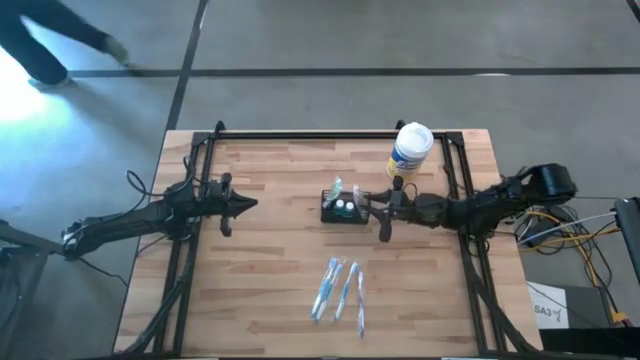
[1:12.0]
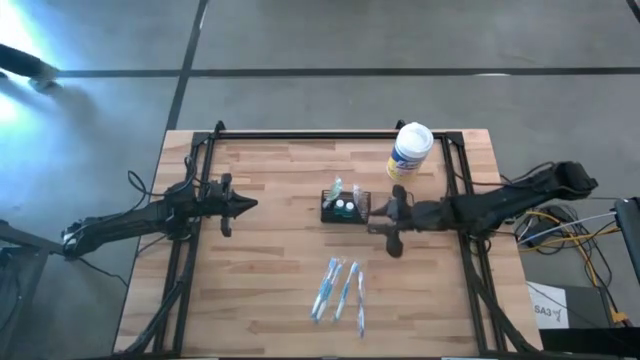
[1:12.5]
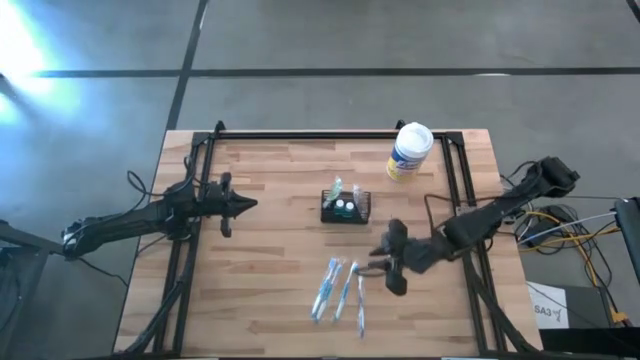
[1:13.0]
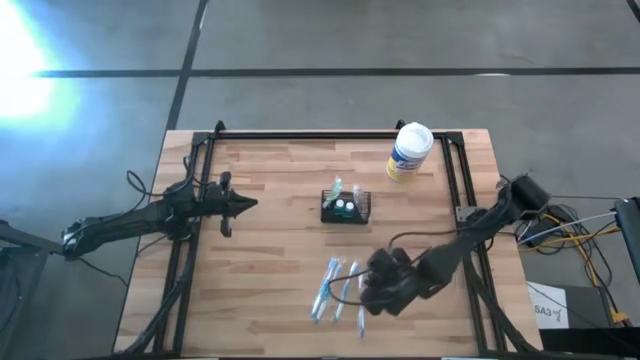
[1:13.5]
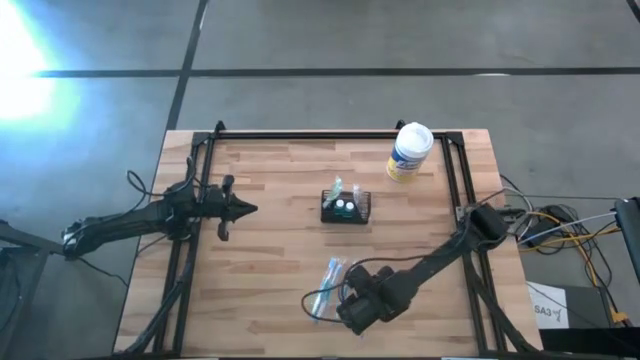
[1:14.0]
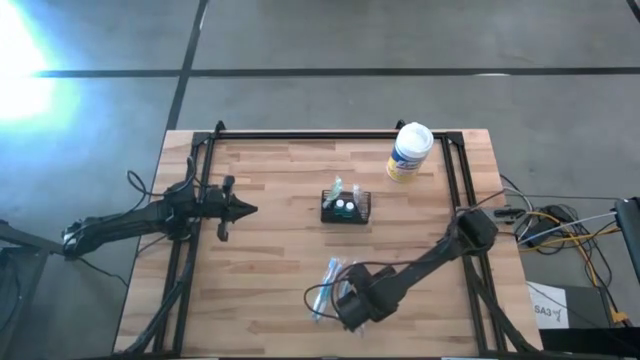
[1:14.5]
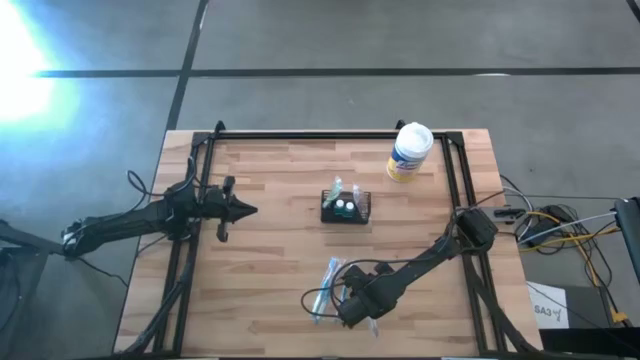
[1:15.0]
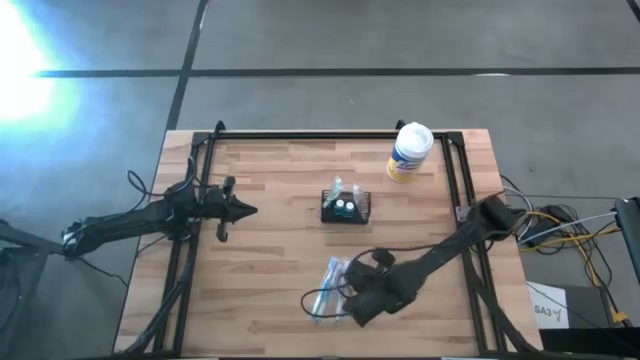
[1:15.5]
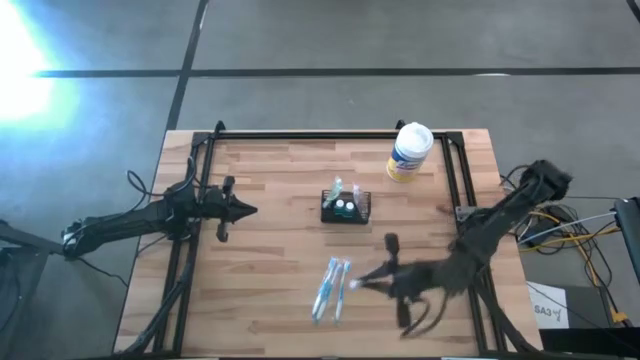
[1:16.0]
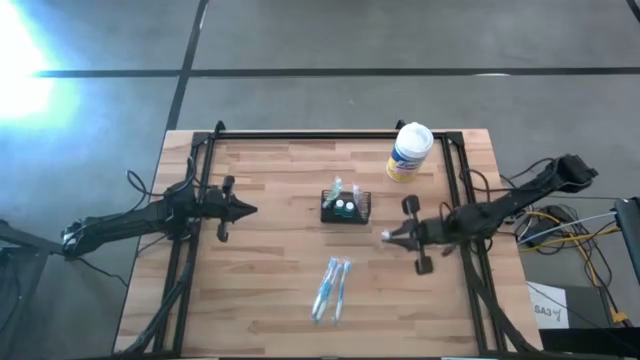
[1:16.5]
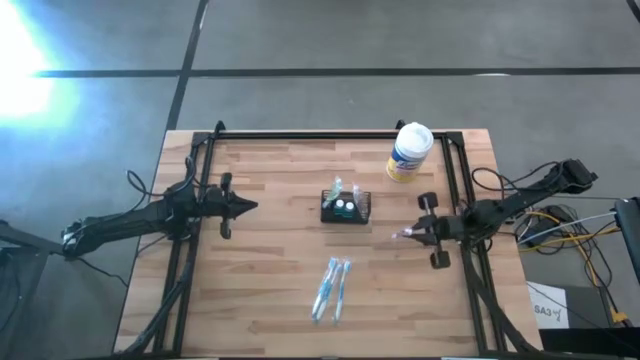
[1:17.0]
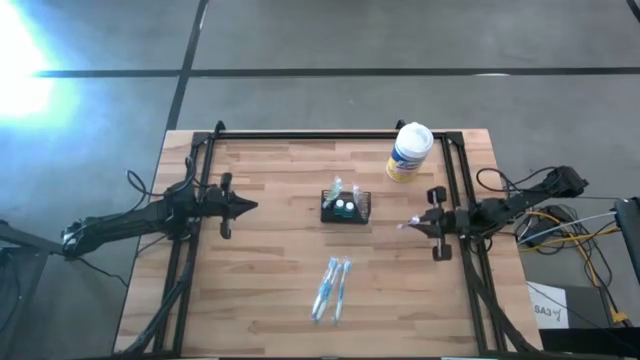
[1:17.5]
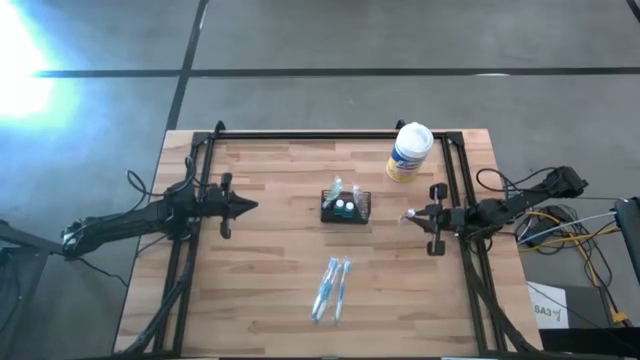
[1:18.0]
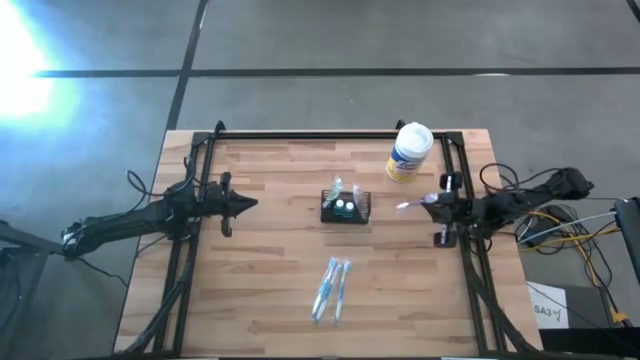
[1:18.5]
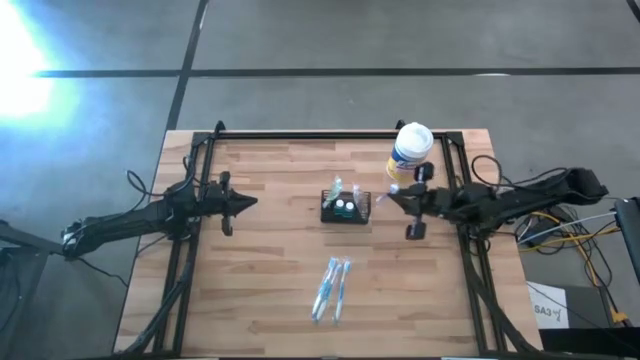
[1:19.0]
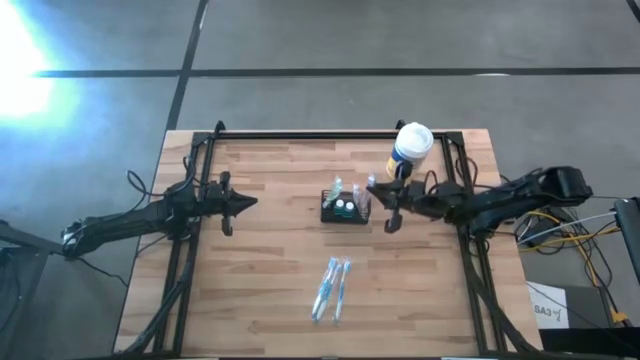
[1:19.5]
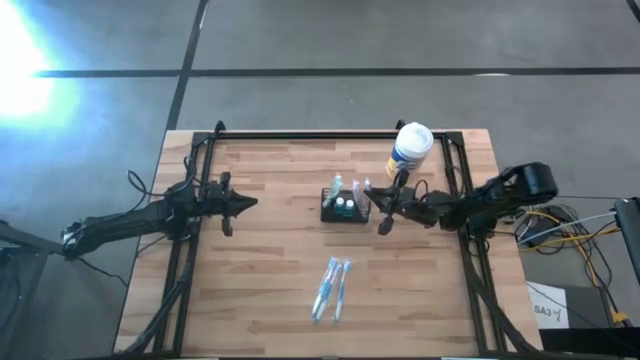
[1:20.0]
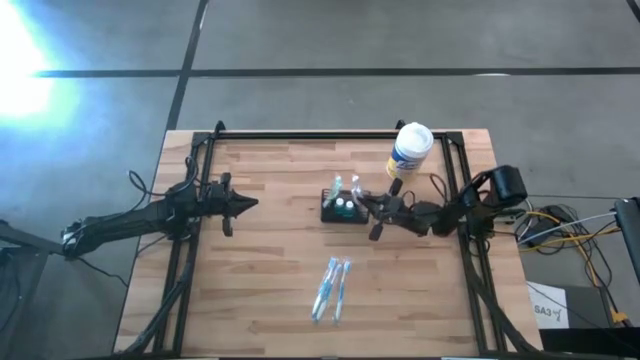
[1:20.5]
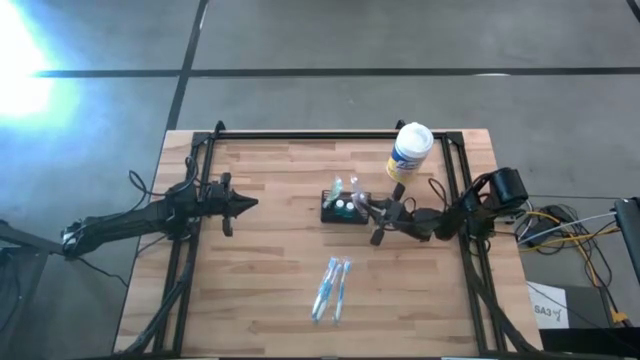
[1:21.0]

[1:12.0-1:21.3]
Task: Pick & Place toothbrushing station
Put the violet toothbrush into the wire organizer

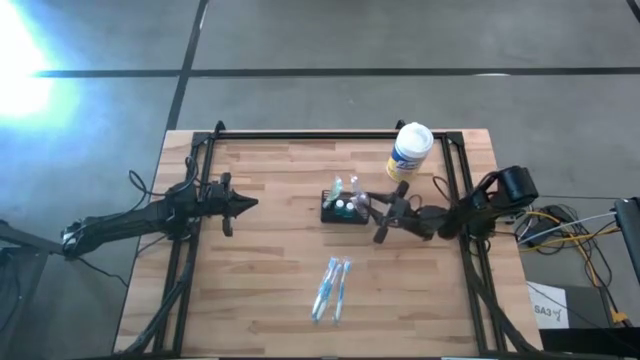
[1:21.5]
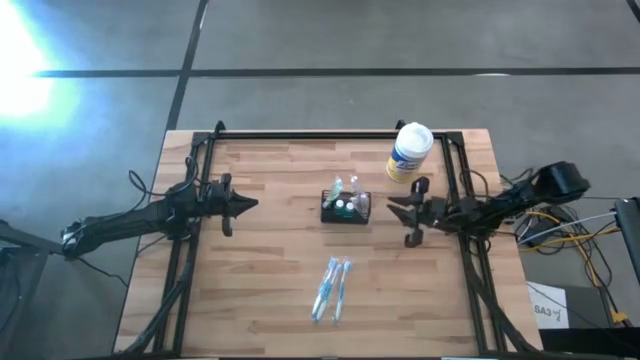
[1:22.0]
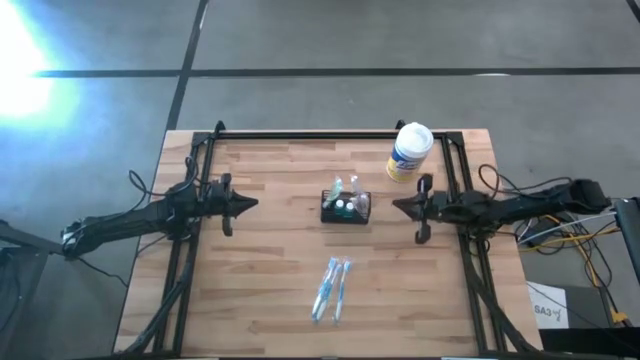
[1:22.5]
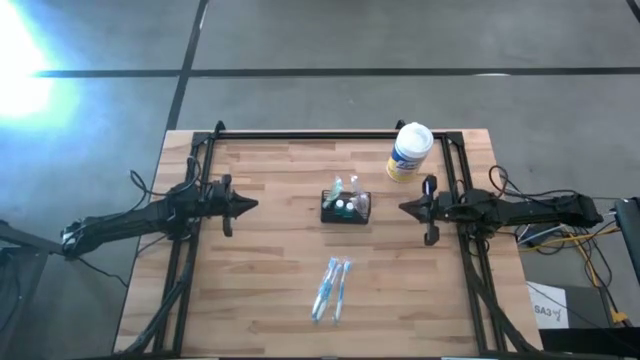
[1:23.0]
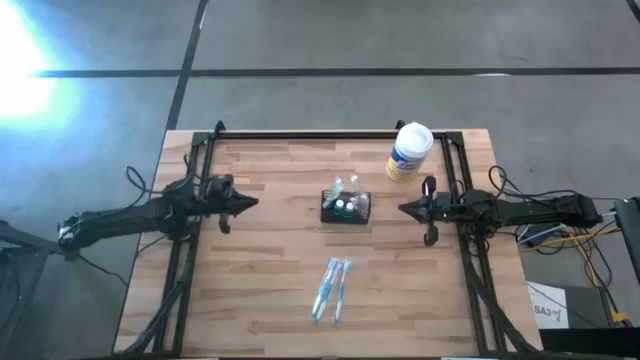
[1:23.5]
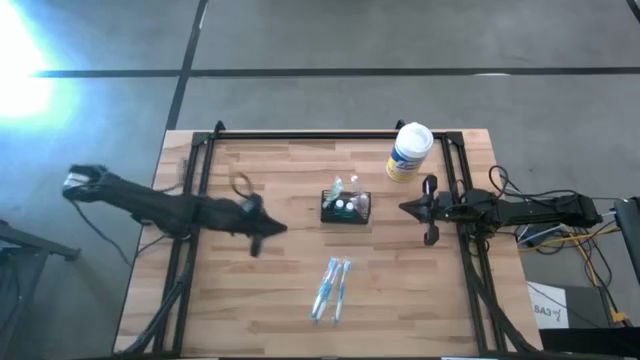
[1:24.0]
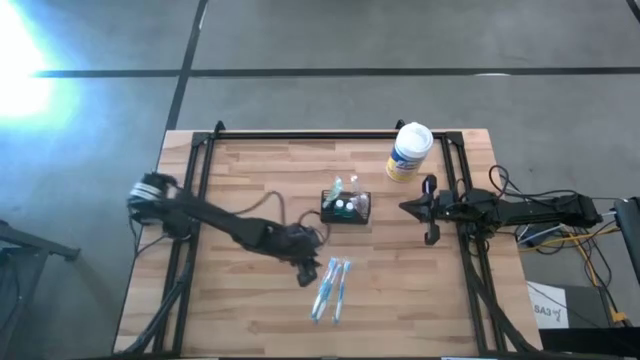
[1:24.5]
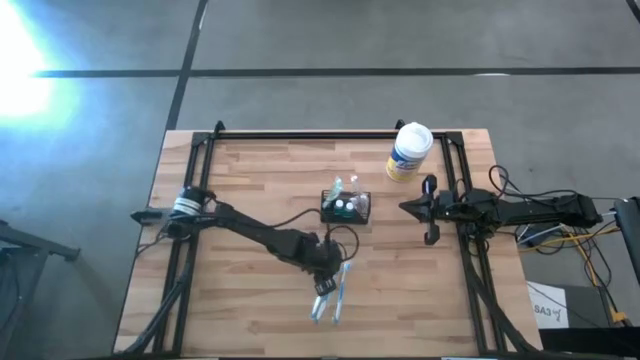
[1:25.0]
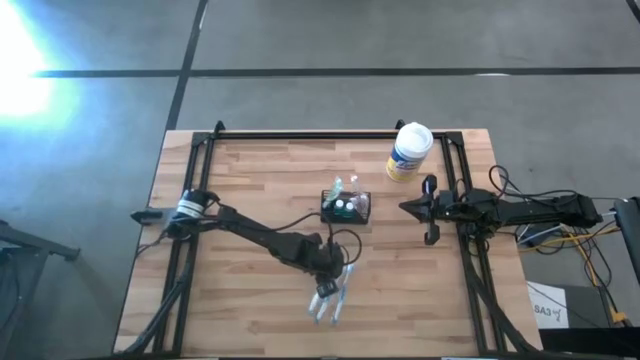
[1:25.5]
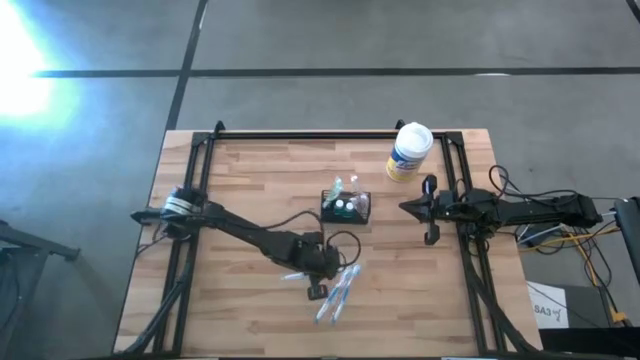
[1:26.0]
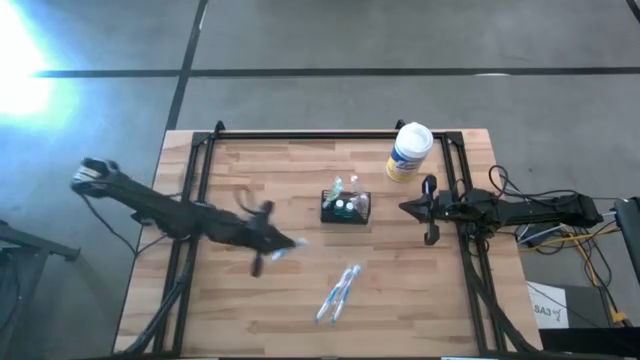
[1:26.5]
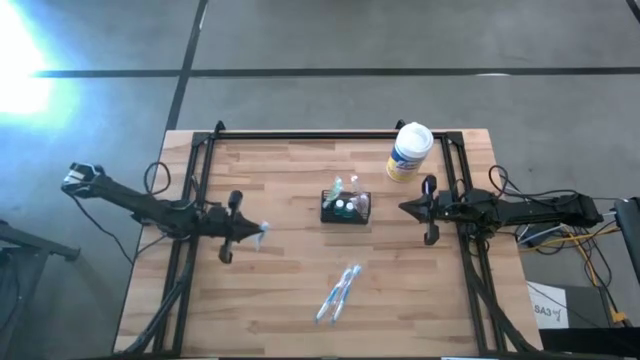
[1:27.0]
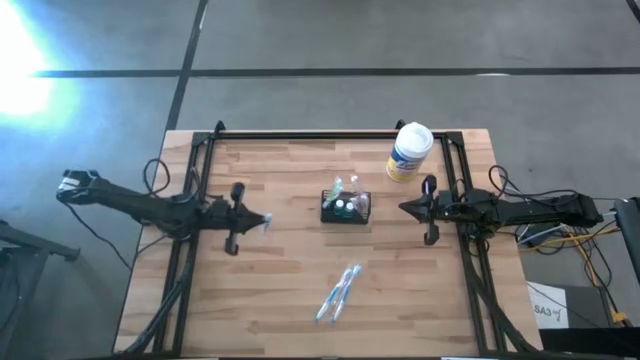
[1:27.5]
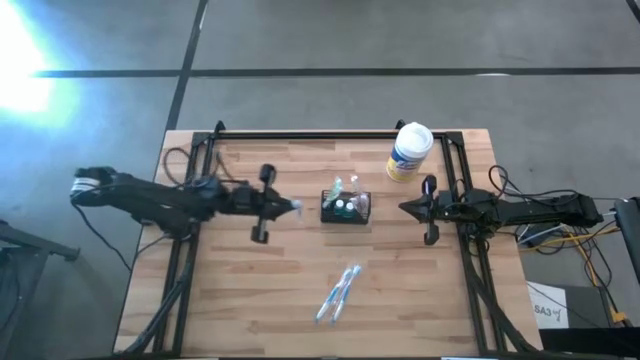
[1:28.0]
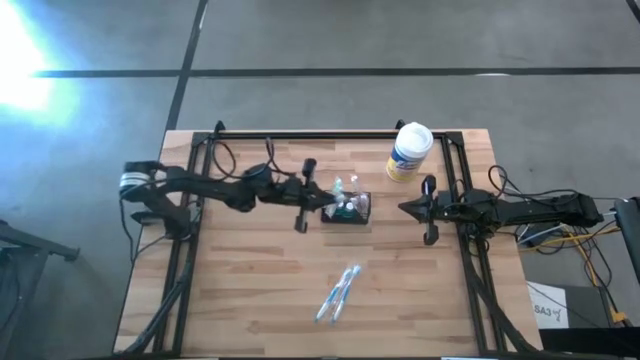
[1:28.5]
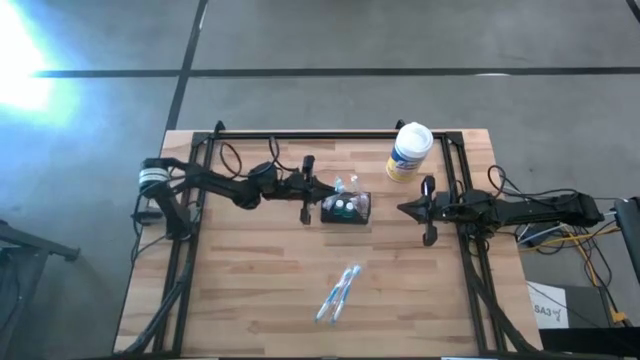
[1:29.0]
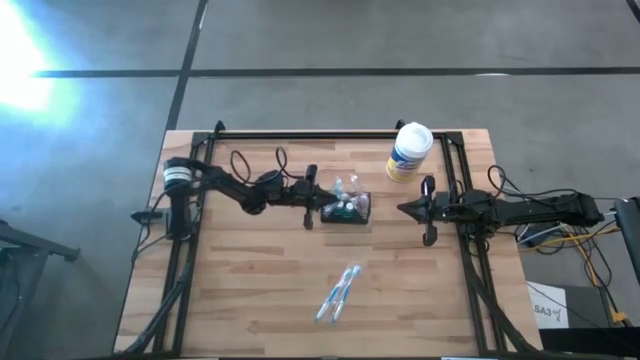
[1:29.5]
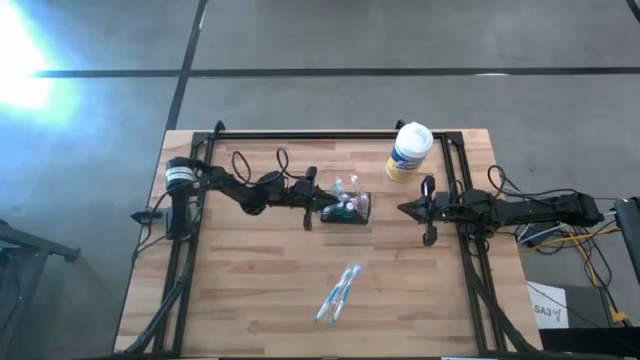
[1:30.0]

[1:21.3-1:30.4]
Put the left blue toothbrush into the wire organizer
